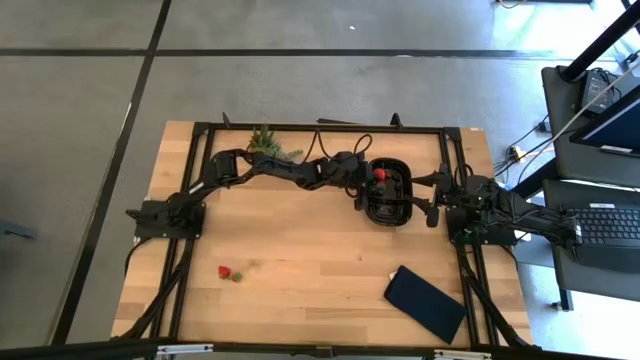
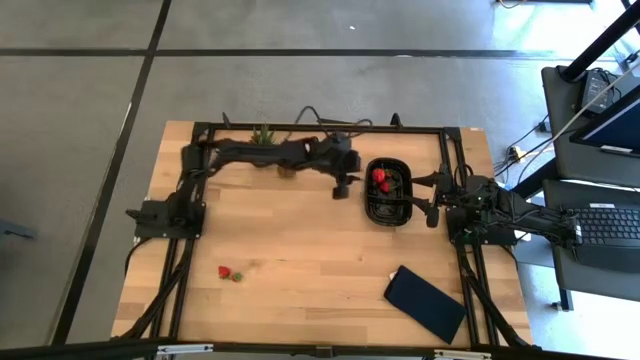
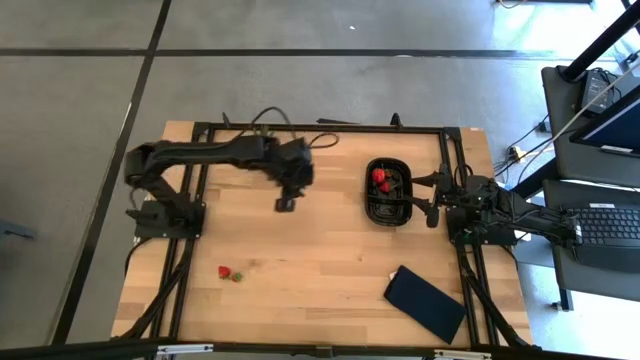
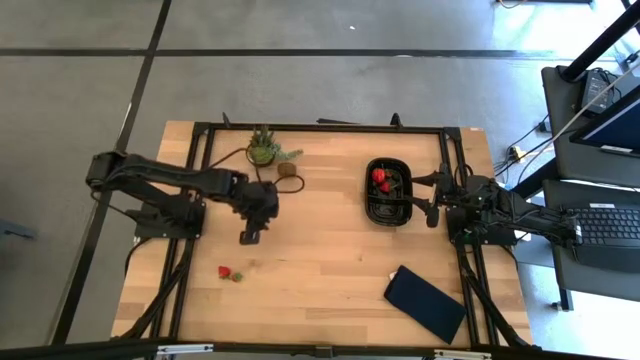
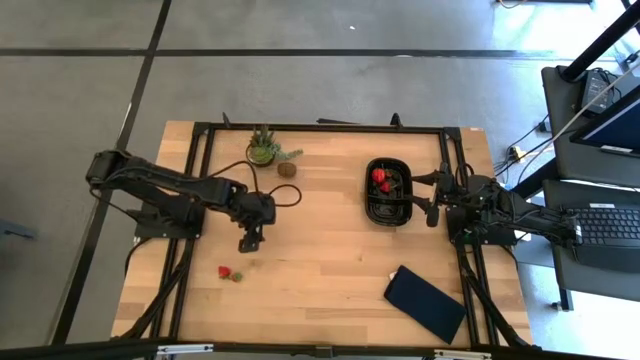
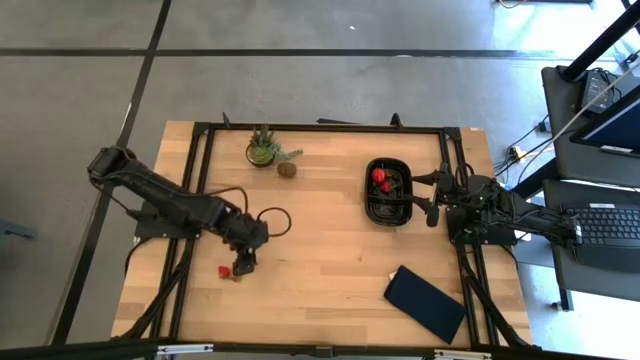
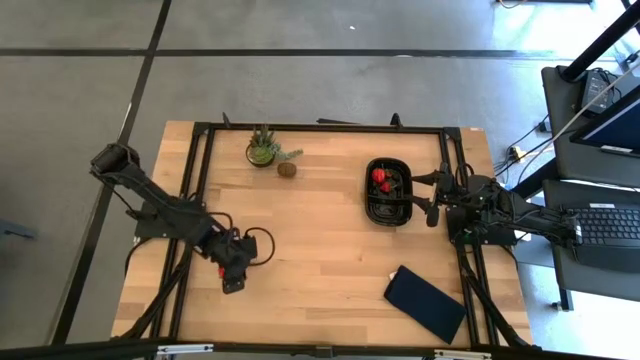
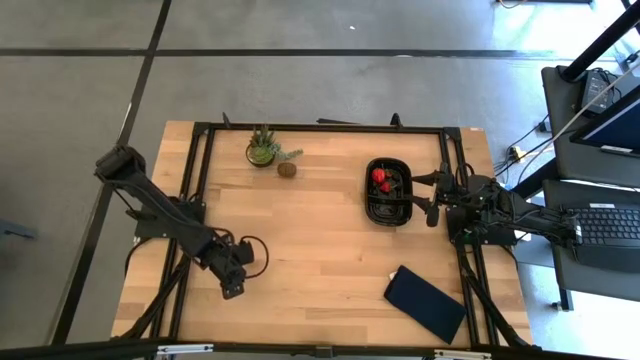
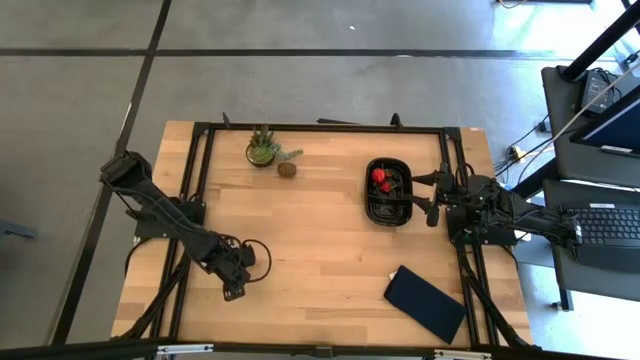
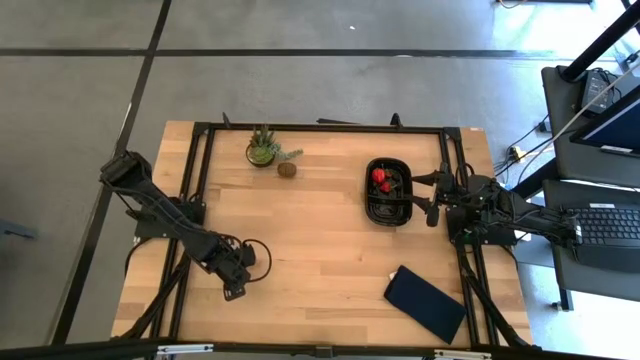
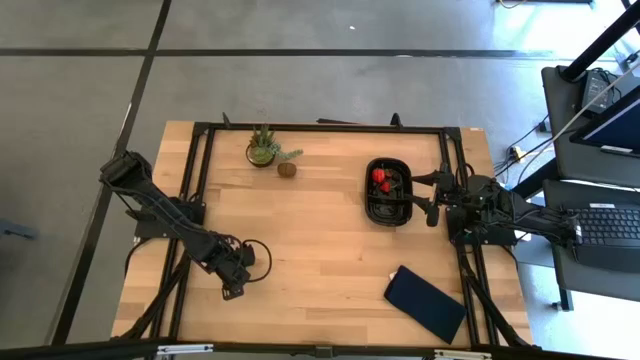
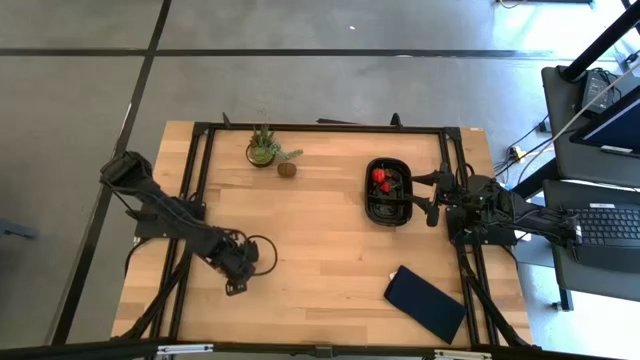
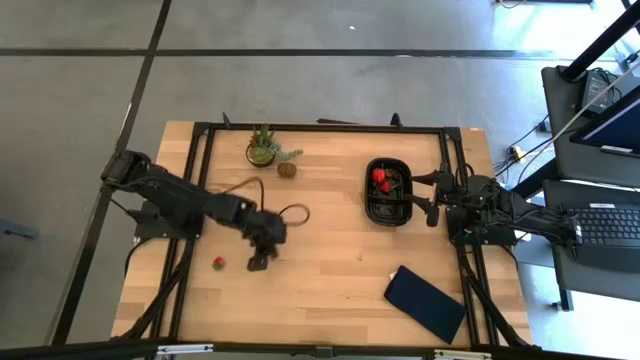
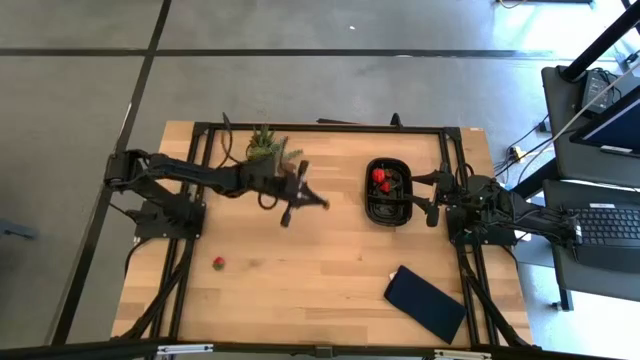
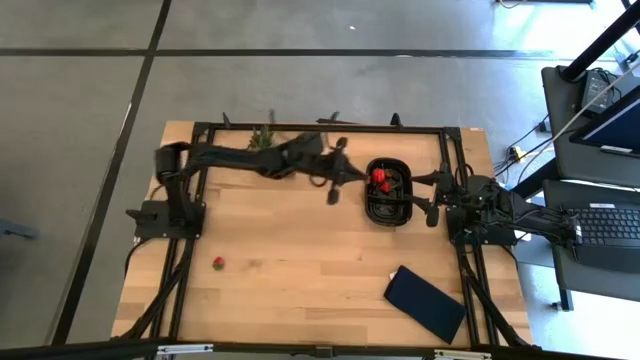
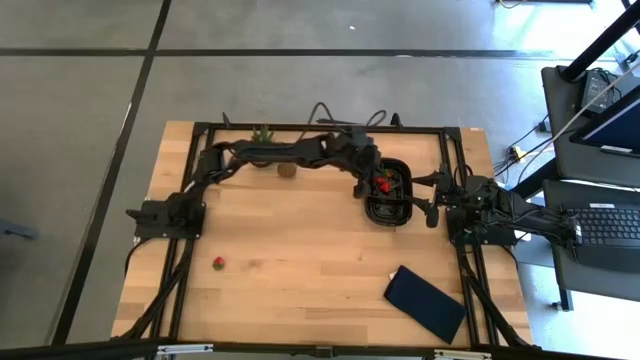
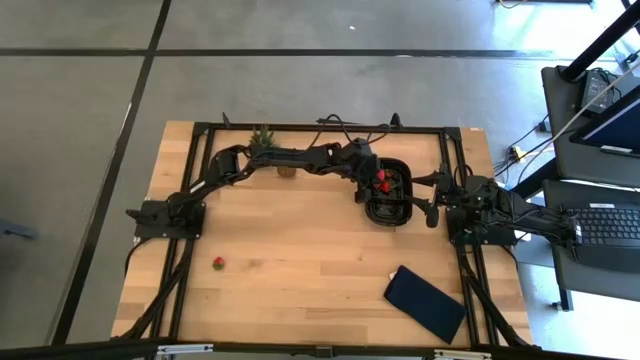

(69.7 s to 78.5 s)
Task: Pick and placing Produce into tupperware
Put the red strawberry into the black bin

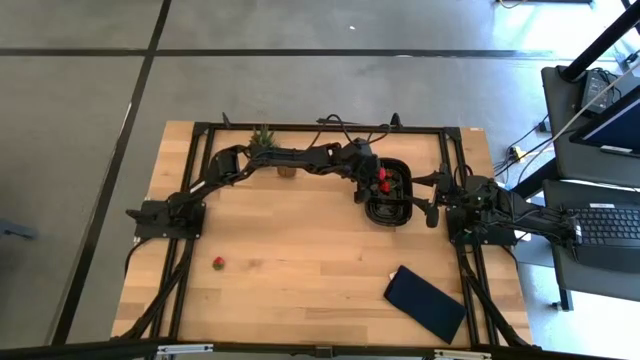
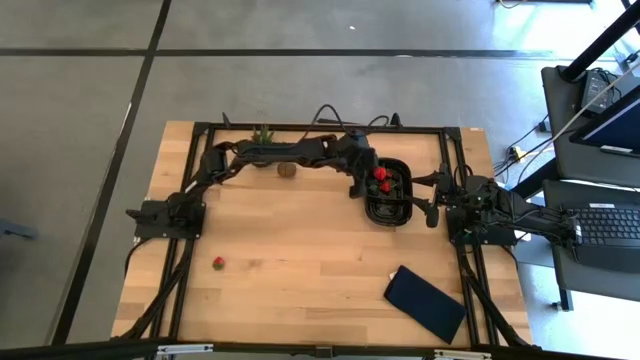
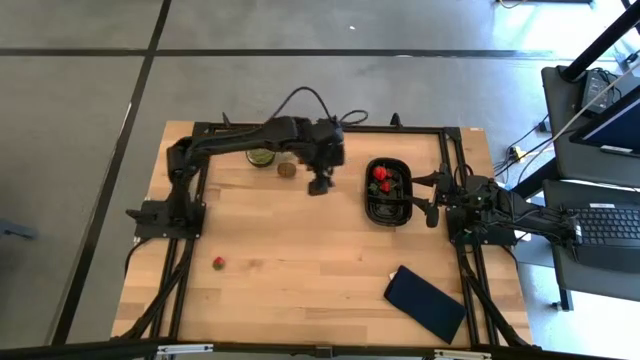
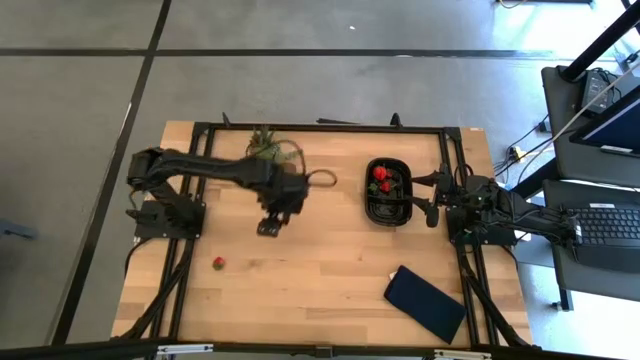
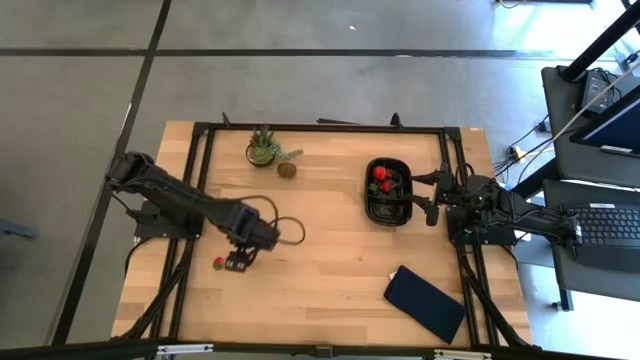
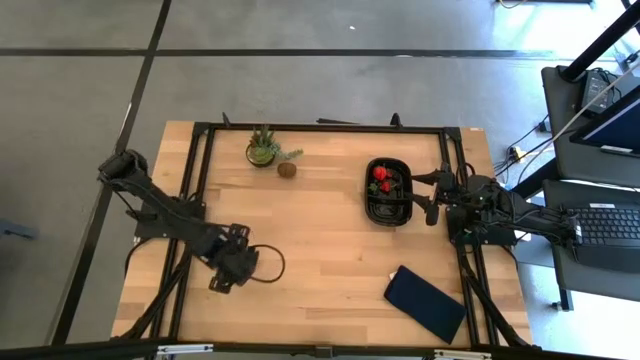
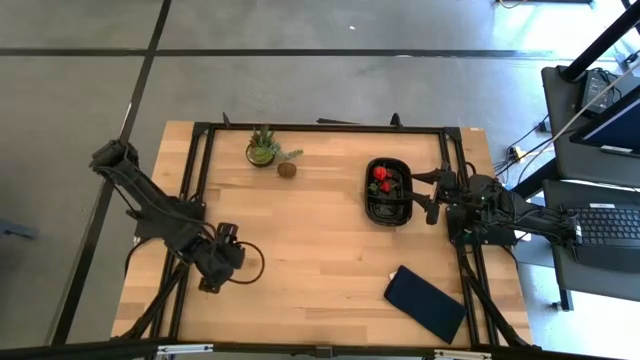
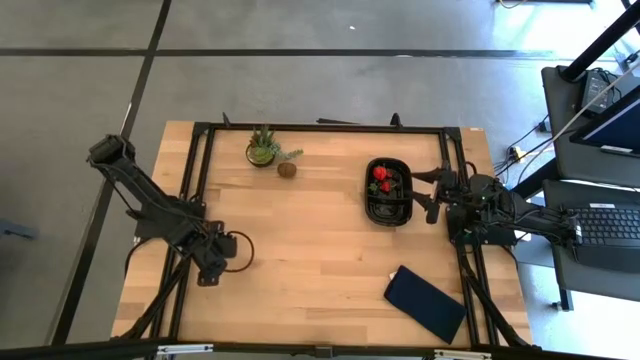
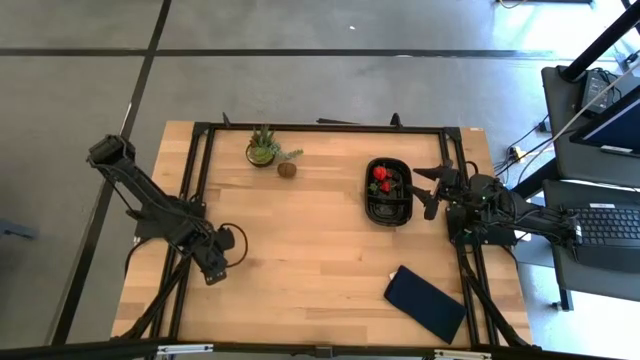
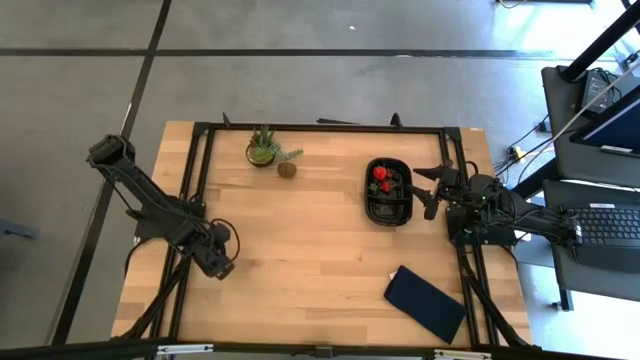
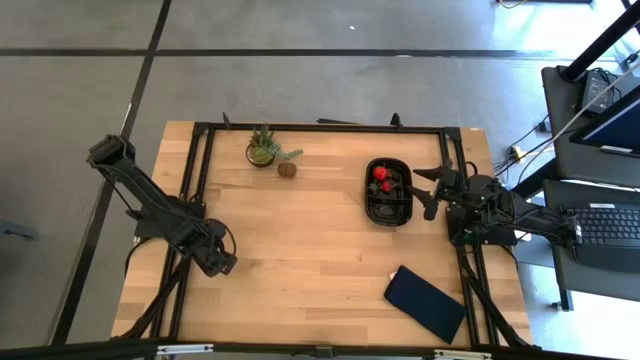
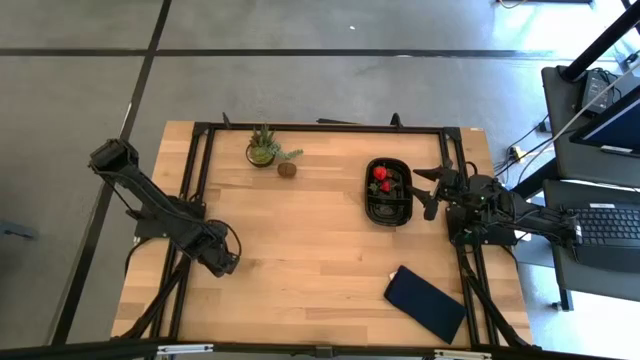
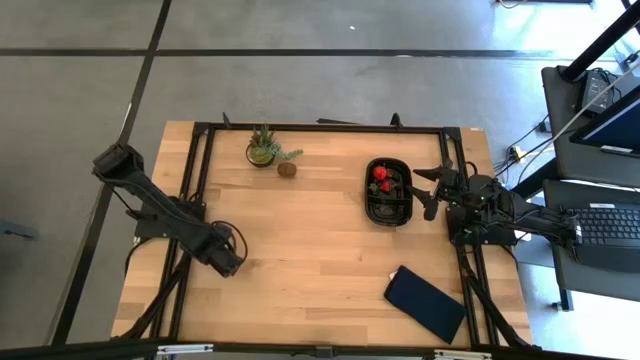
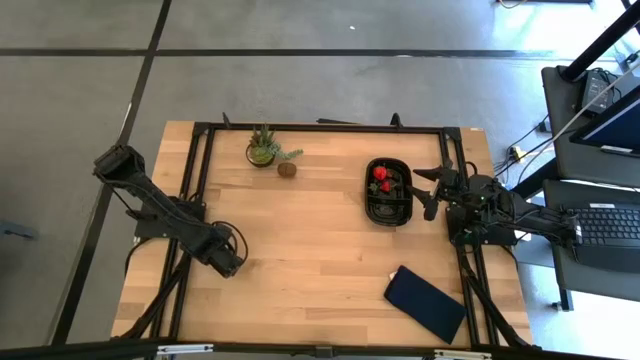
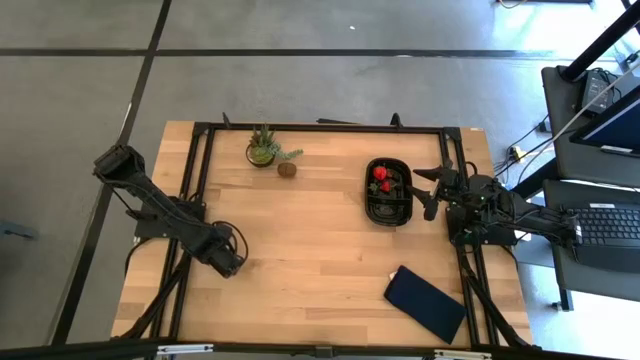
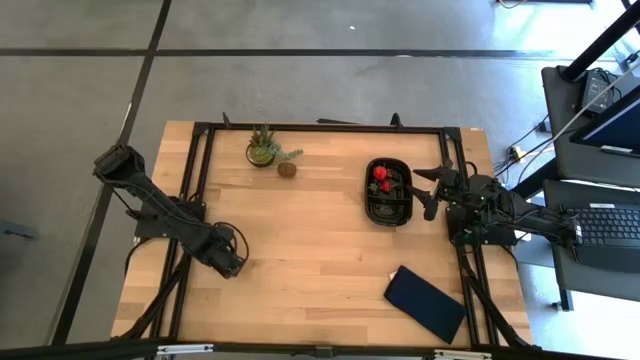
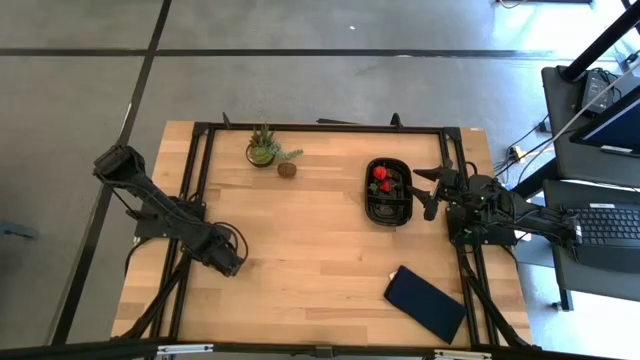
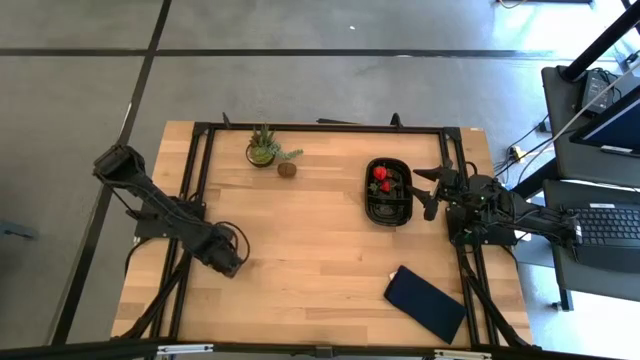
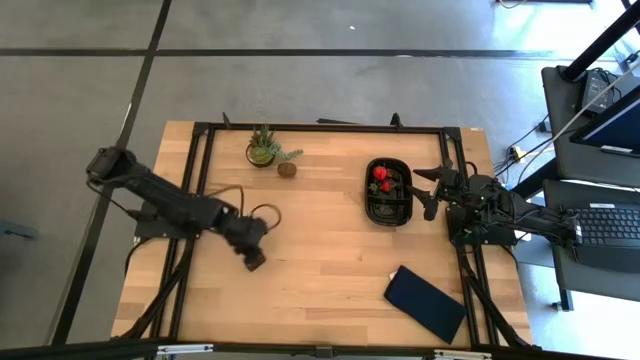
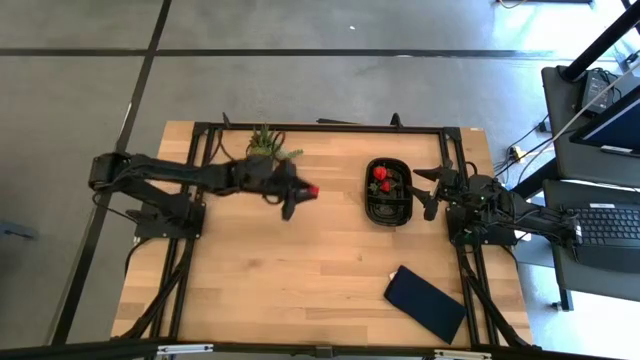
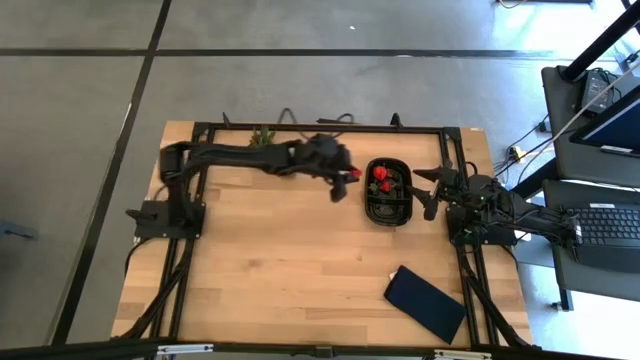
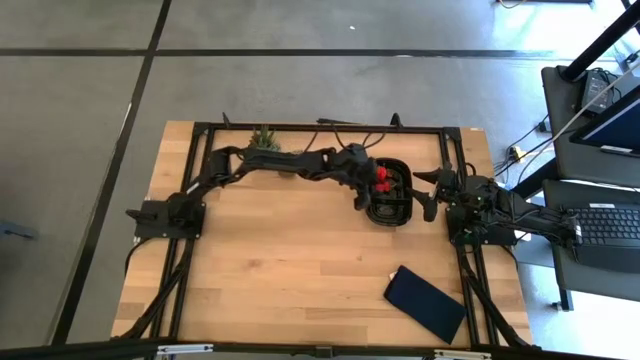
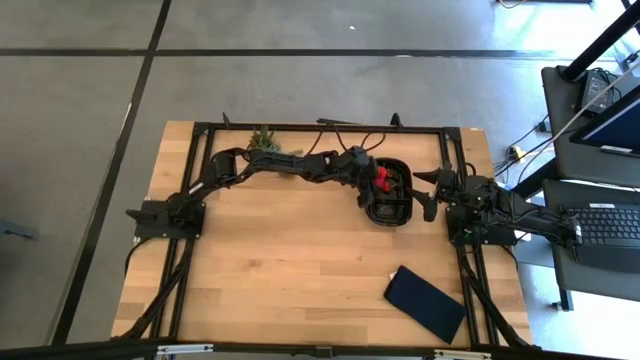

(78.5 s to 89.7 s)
Put the red strawberry into the black bin

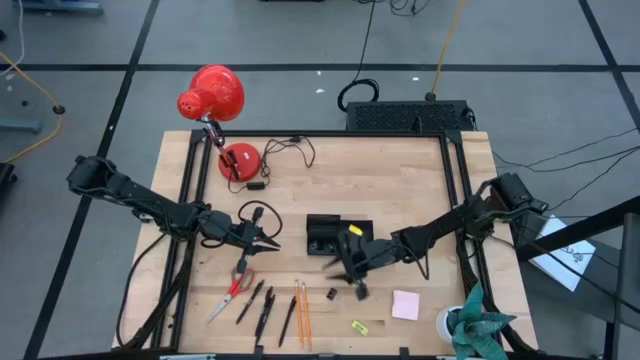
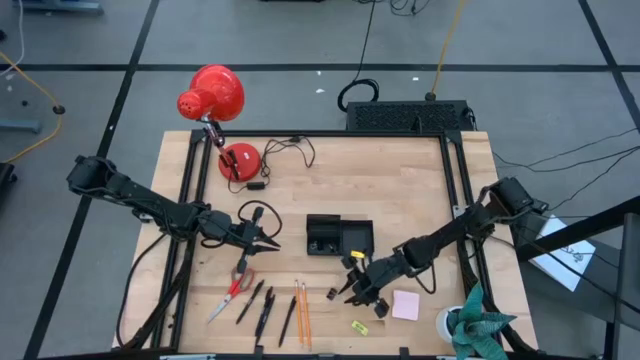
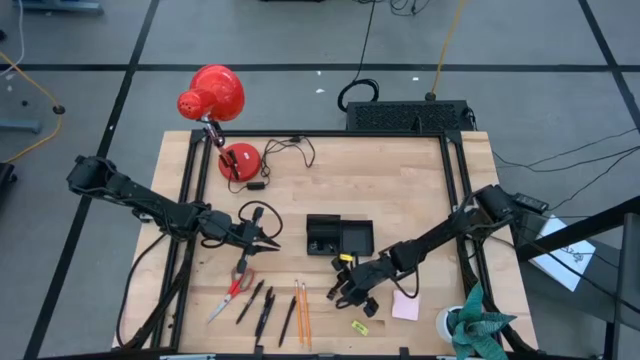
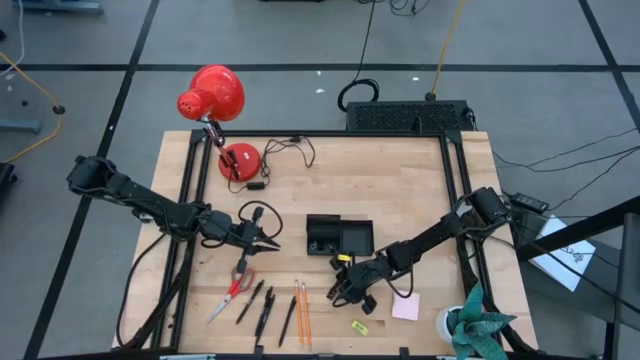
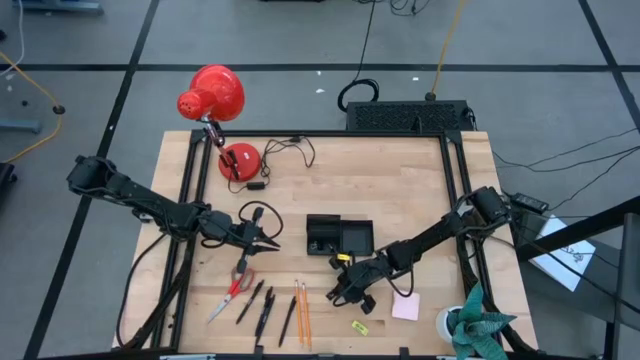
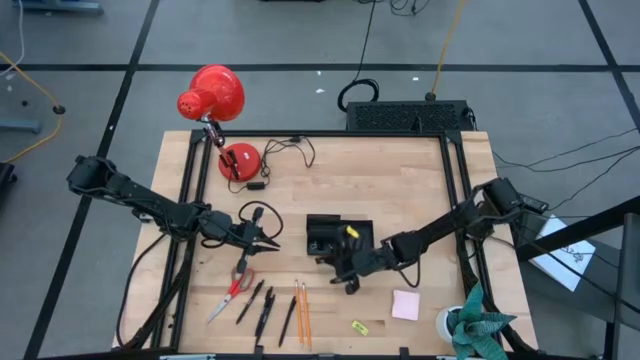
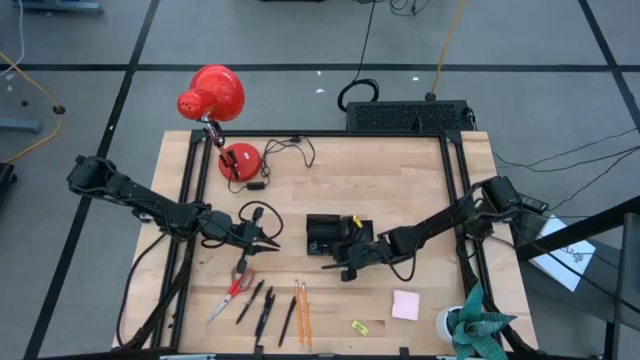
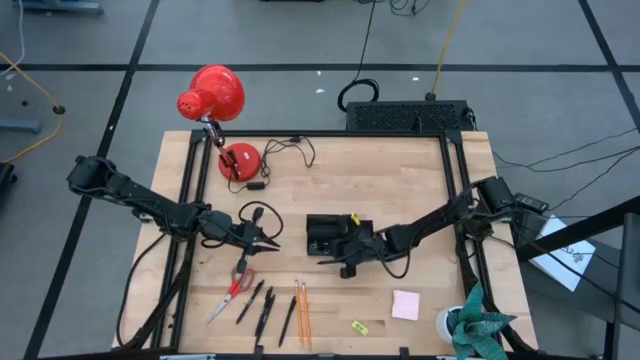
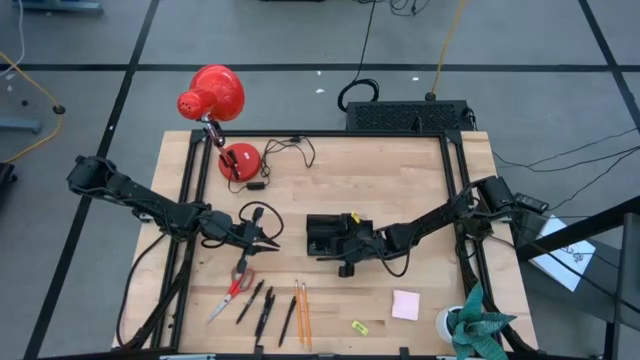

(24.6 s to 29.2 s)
Task: Pick and place office supplies into organizer
Put the black binder clip into the black desk organizer
